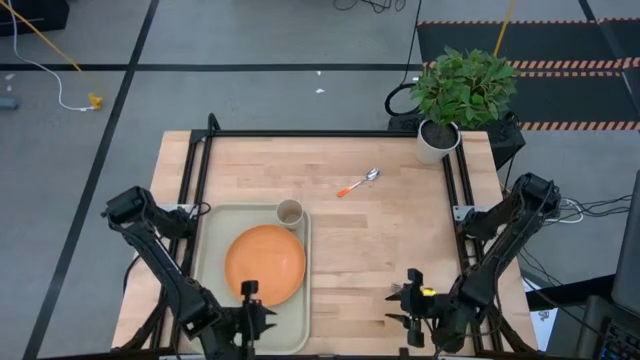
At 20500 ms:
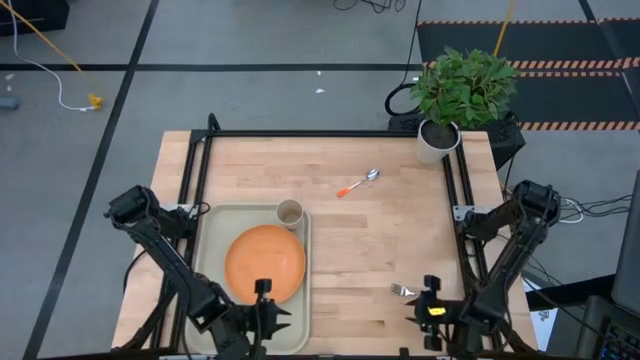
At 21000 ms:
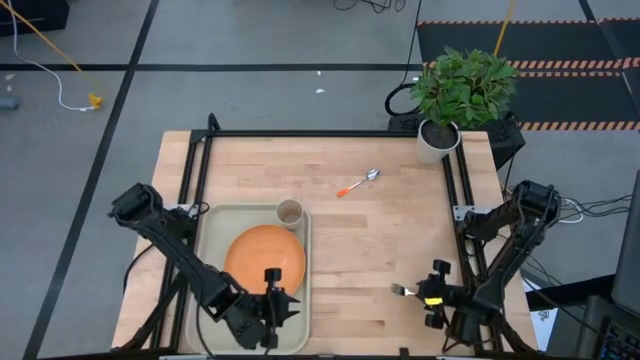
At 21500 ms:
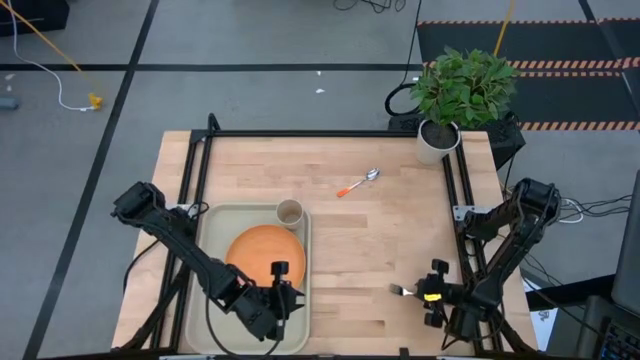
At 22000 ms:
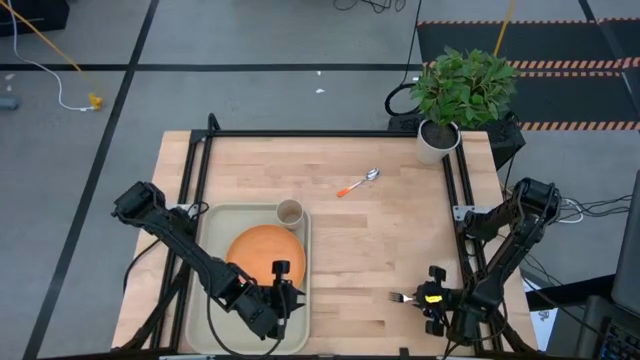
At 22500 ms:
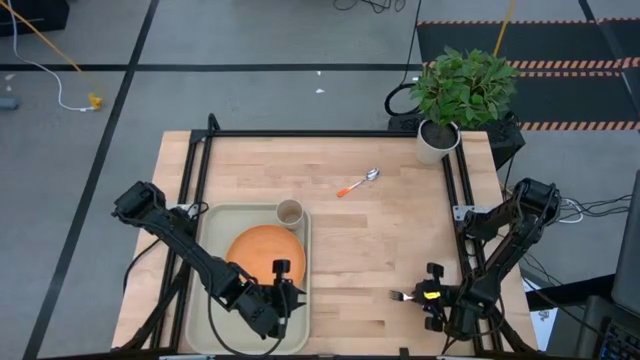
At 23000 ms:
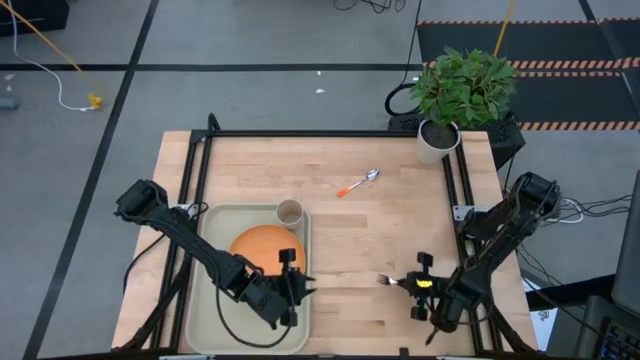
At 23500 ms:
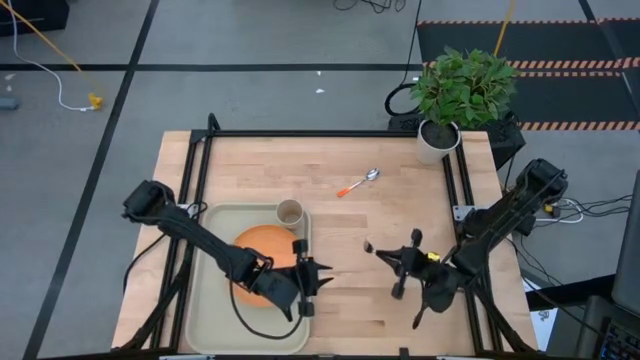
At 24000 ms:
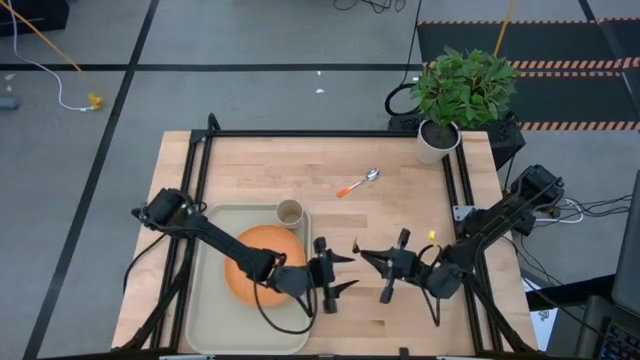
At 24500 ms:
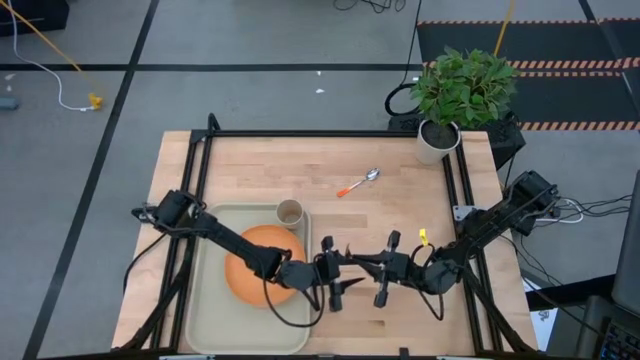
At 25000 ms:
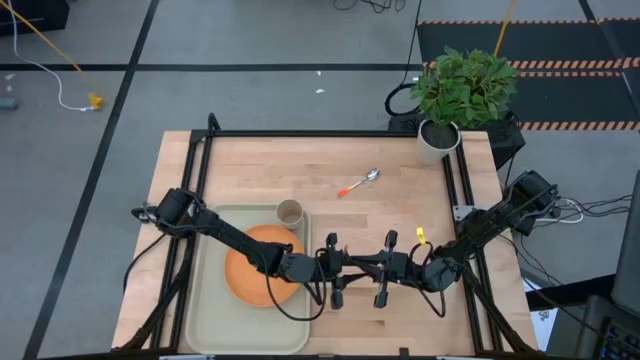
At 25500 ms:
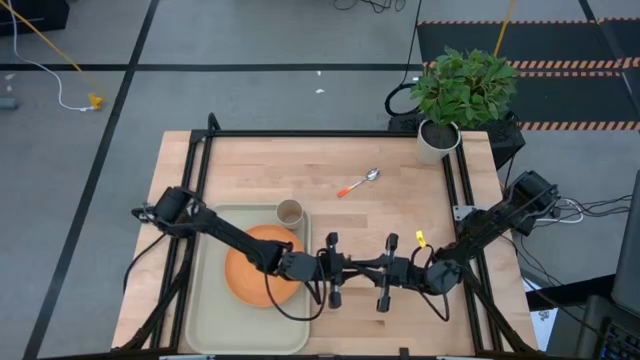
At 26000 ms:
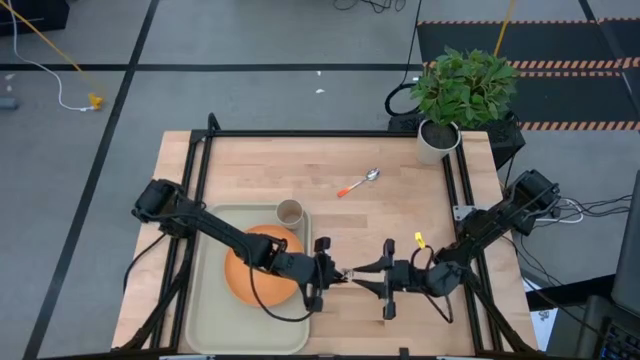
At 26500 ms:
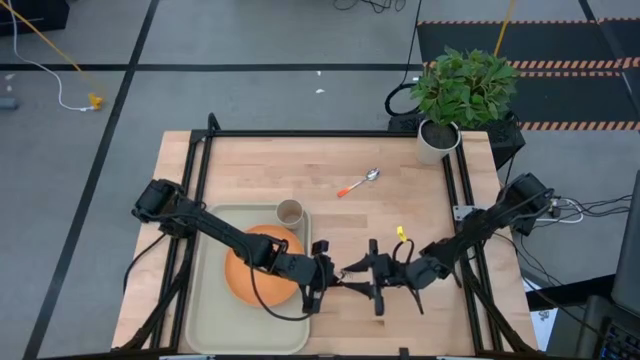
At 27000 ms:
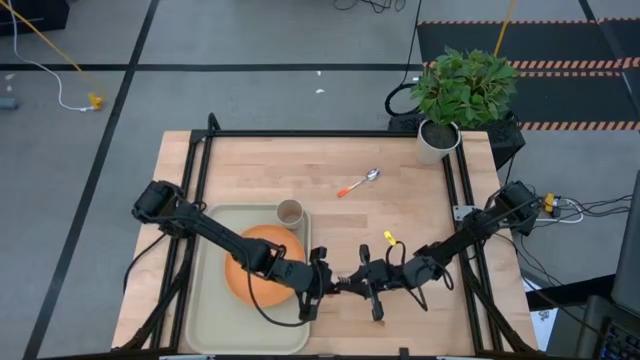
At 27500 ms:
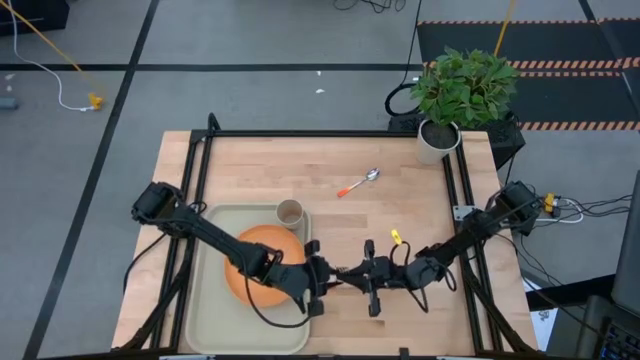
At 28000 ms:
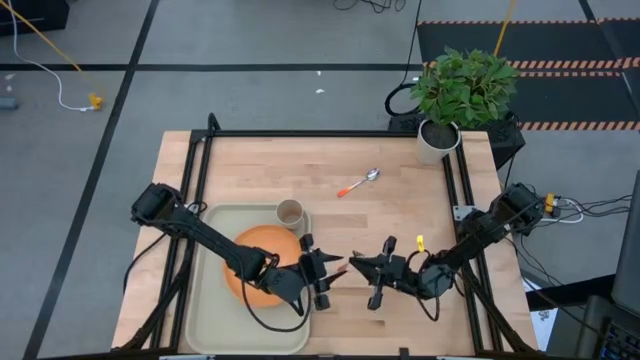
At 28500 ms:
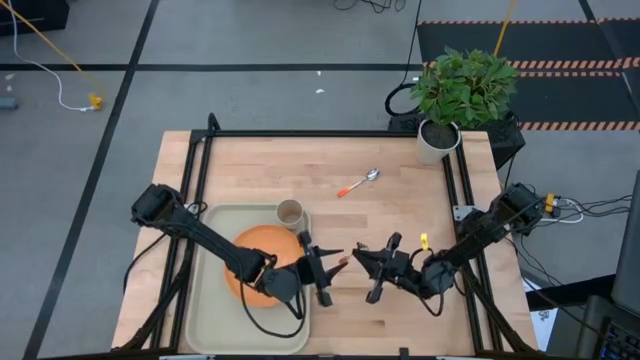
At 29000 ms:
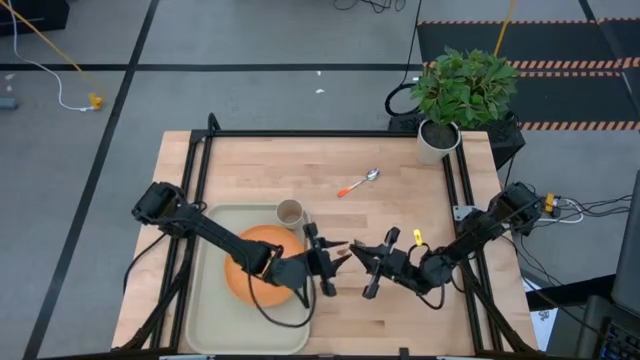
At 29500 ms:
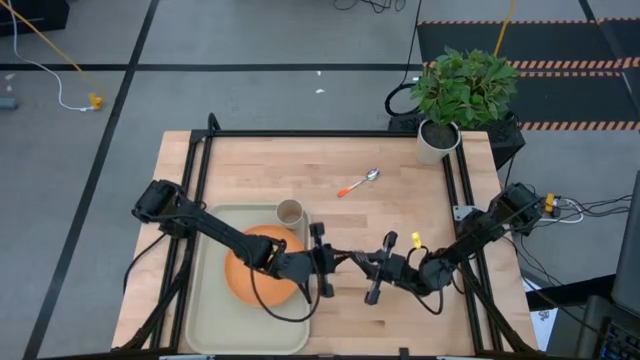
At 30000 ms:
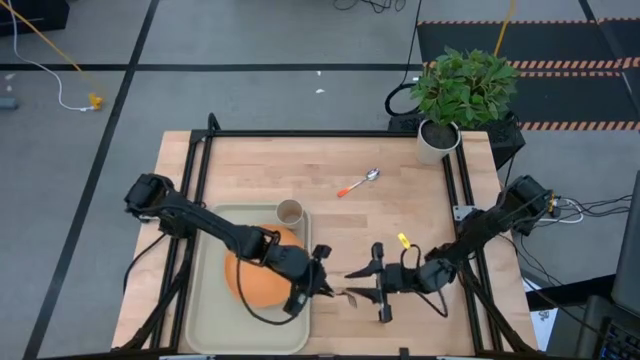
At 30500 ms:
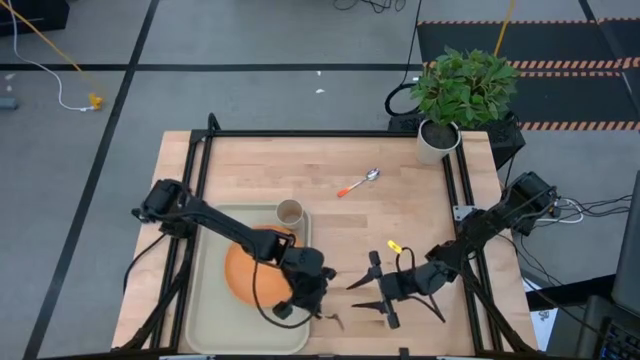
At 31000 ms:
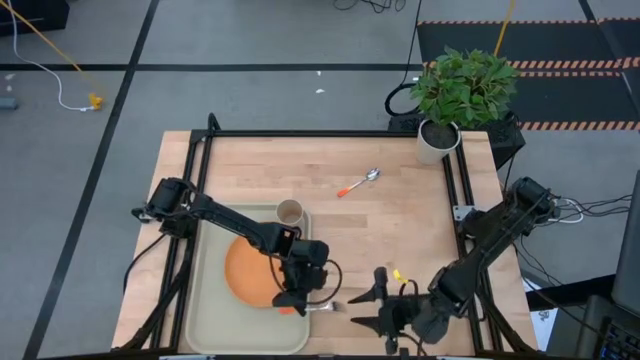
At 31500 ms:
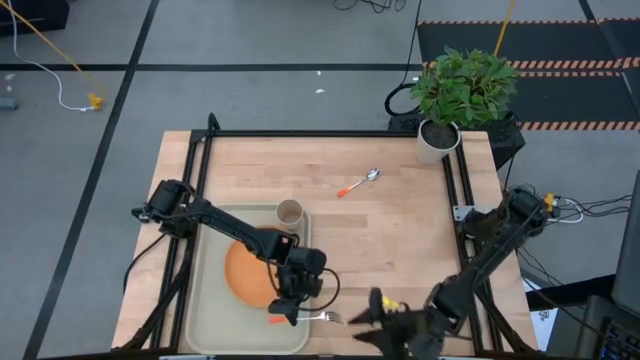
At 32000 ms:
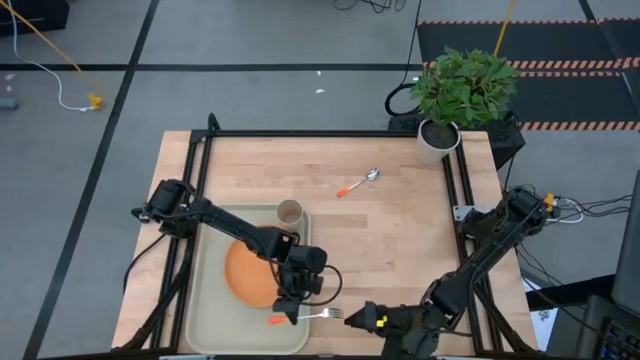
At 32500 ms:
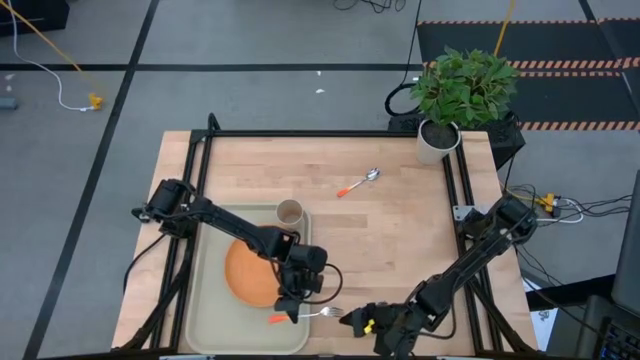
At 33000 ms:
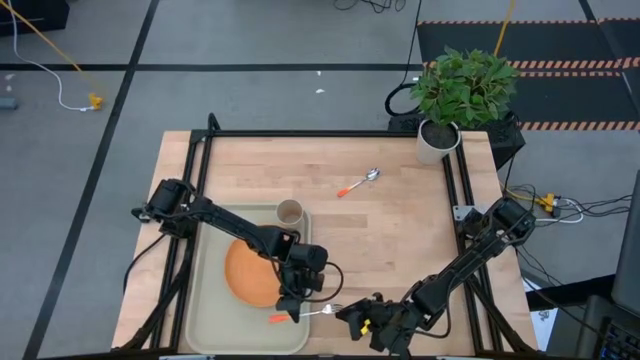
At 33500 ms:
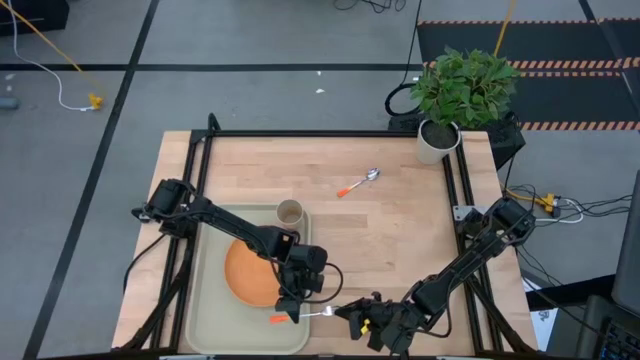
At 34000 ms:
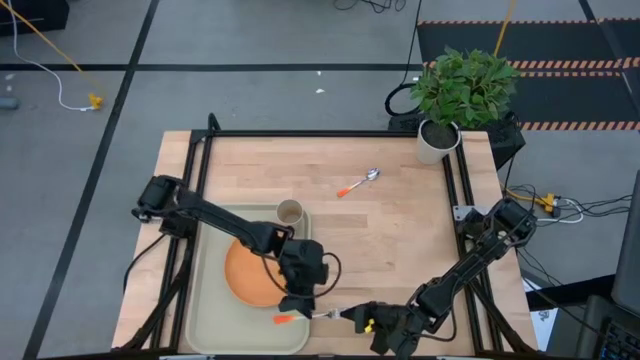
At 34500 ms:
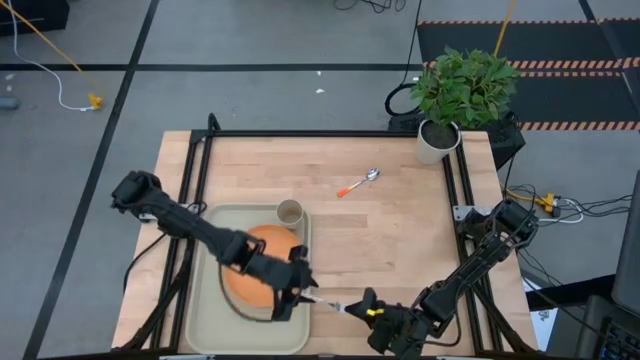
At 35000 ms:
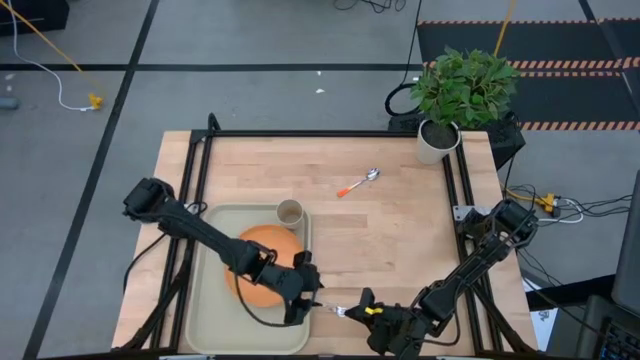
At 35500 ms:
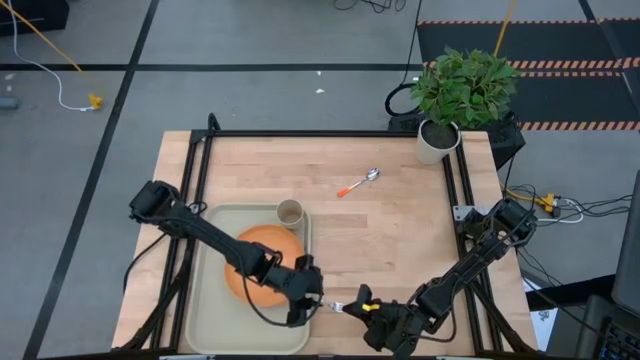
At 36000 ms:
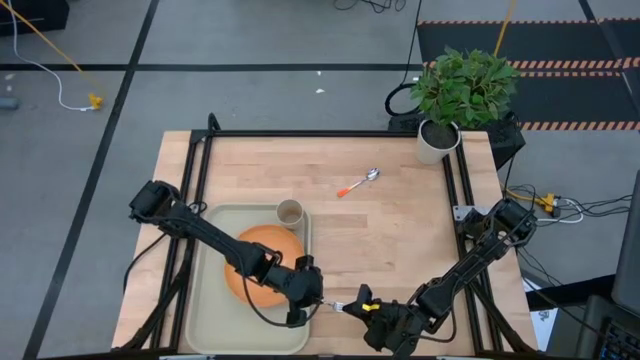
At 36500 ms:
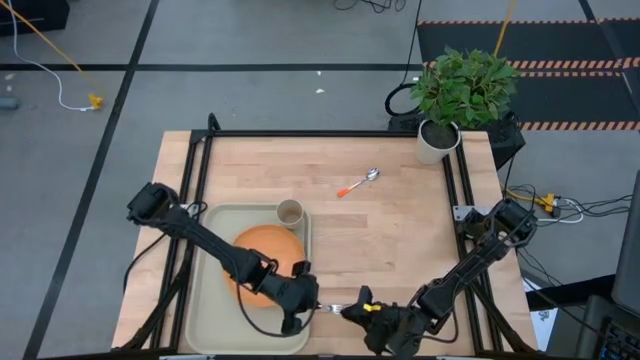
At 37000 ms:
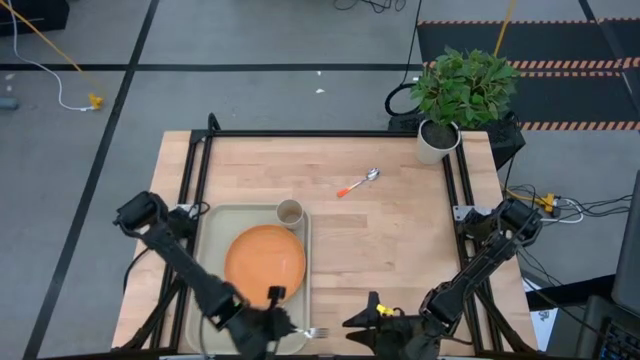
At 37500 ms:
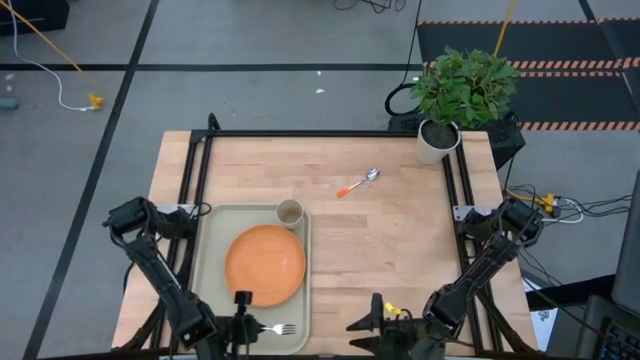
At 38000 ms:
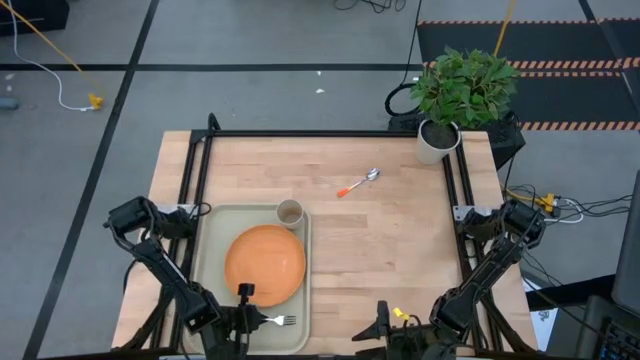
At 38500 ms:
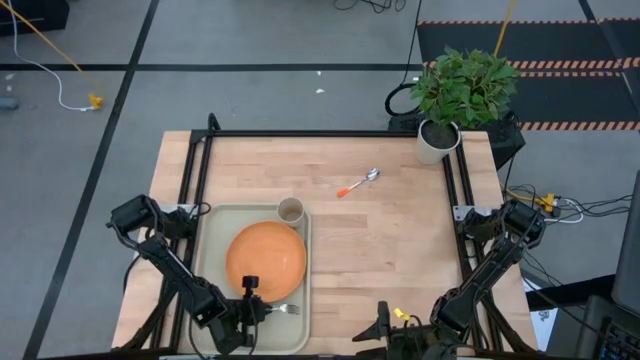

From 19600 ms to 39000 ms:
Task: Pick and place plate/cup/fork/spoon on tray
Put the orange fork on the light yellow tray to the right of the orange plate

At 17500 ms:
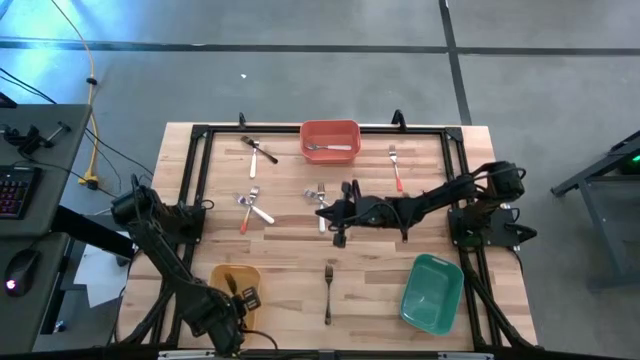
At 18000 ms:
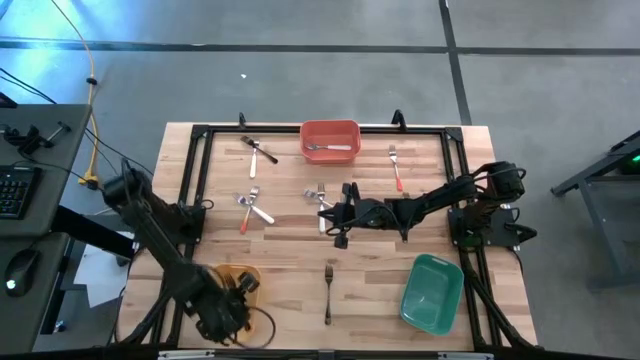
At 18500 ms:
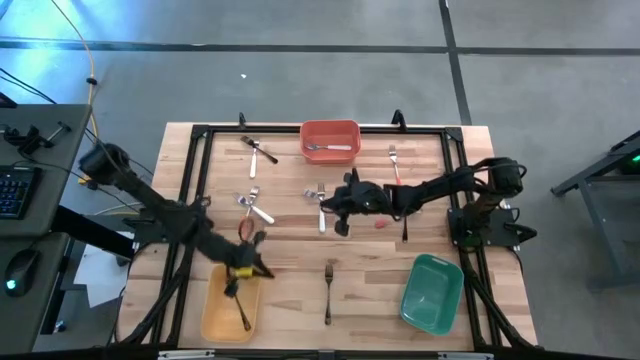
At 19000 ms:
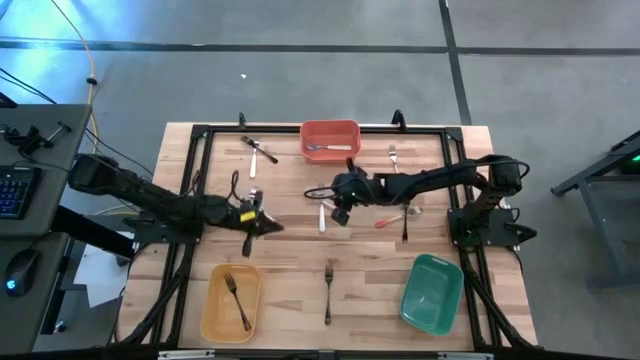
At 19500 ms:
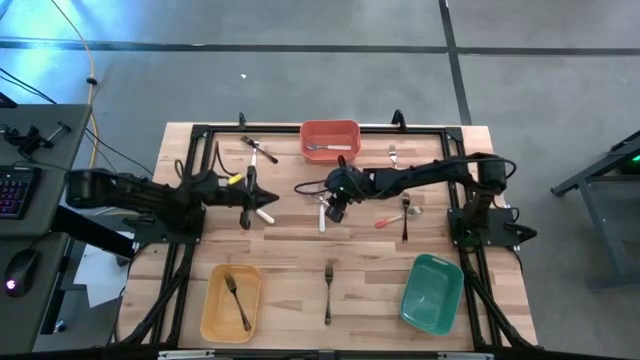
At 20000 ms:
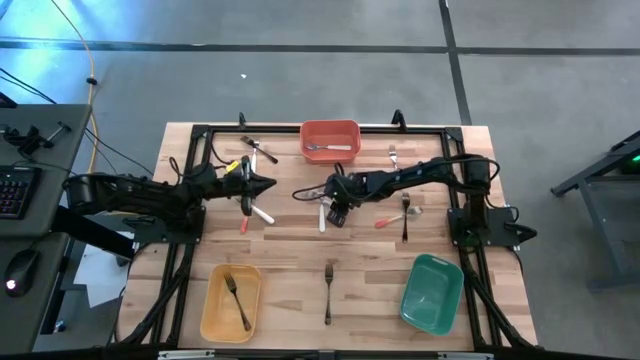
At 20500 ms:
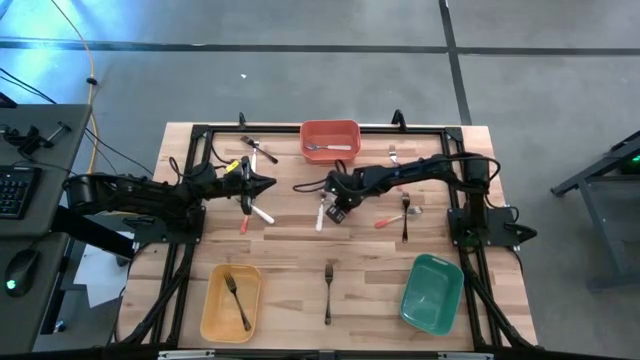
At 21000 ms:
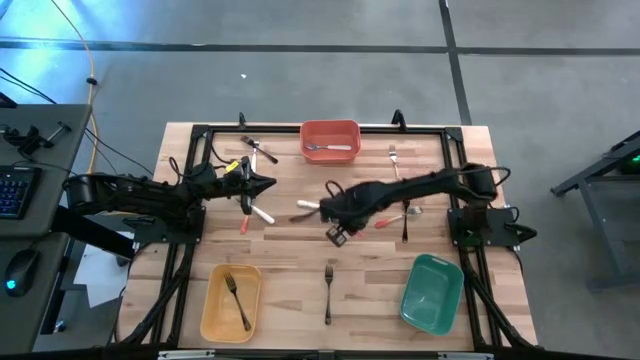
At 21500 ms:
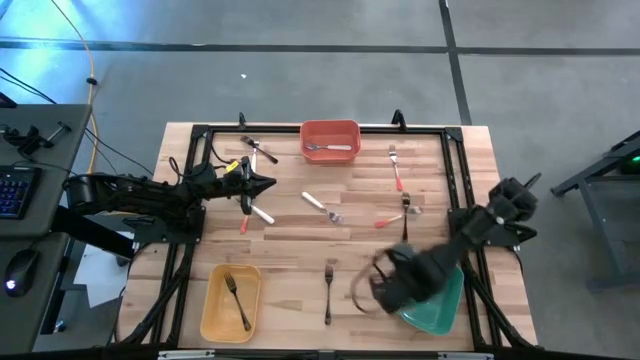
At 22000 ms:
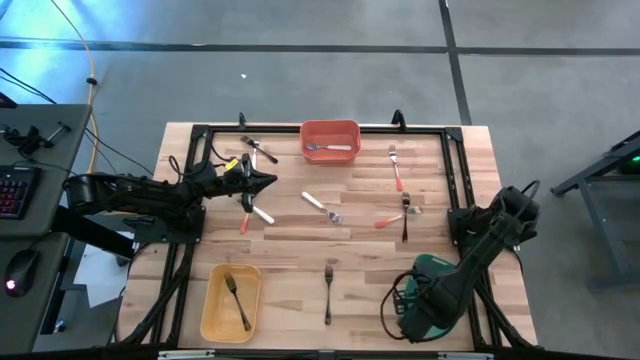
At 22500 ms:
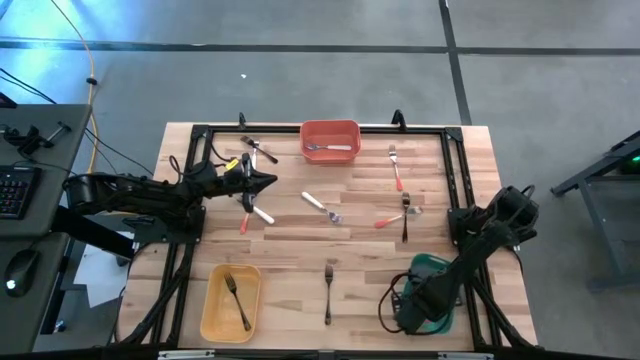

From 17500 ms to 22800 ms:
Task: Sort silverware by color (type)
Put the bottom middle orange fork into the green bin
